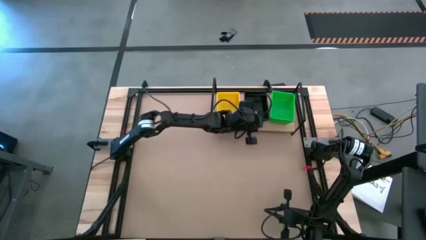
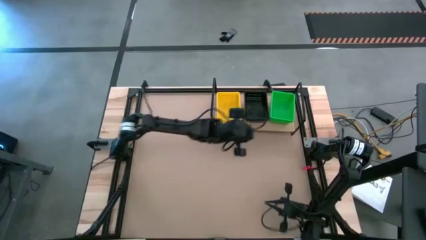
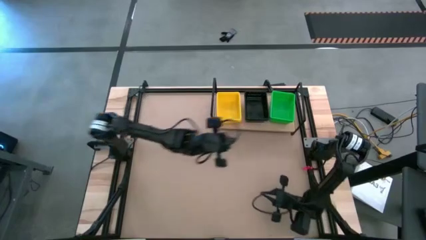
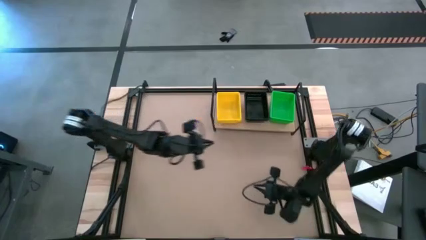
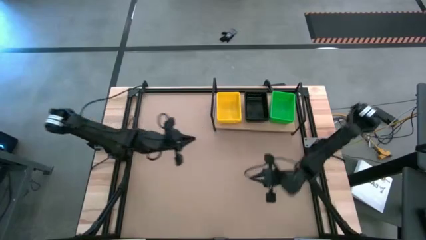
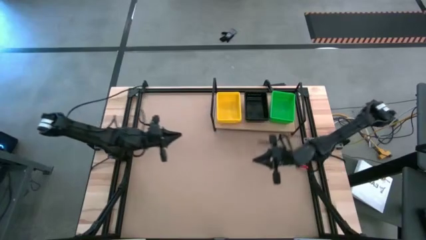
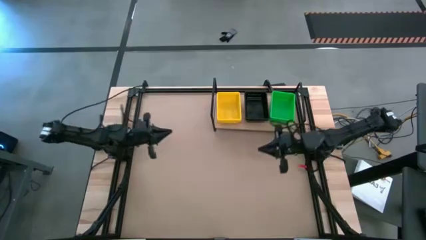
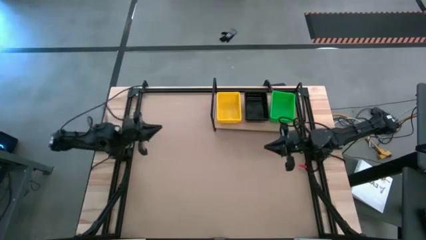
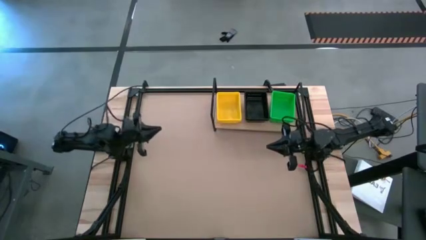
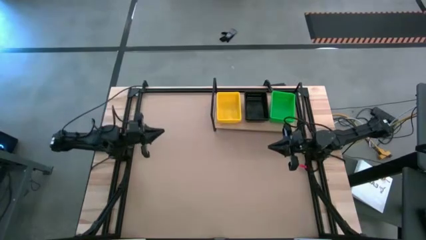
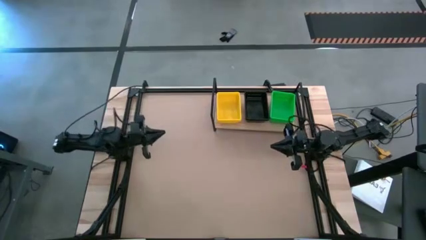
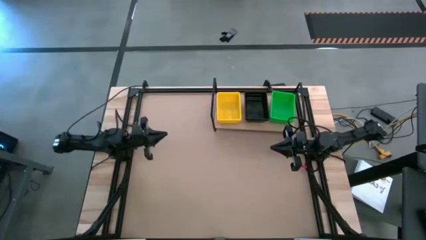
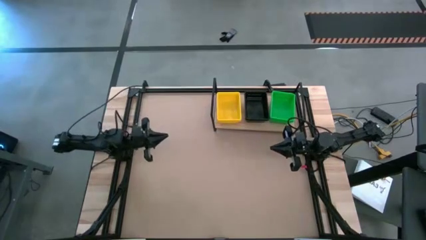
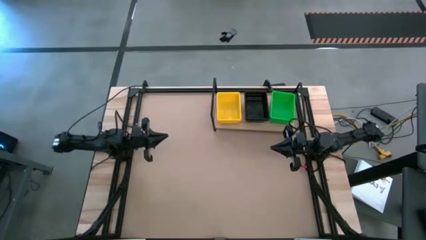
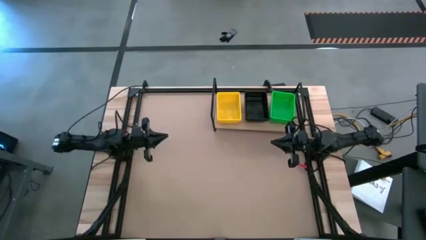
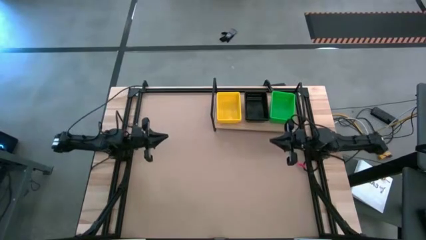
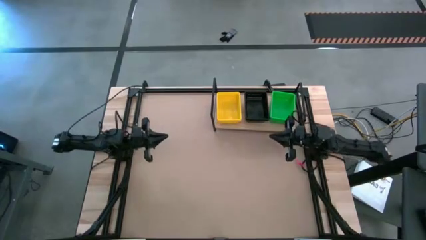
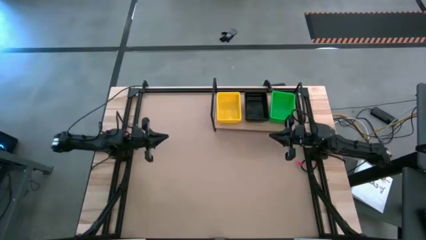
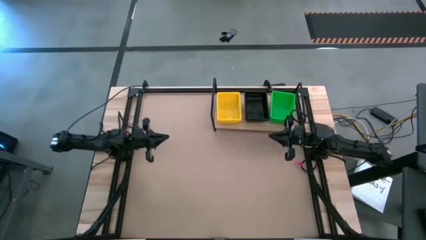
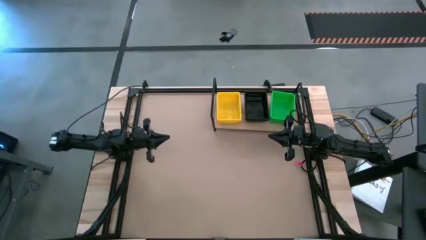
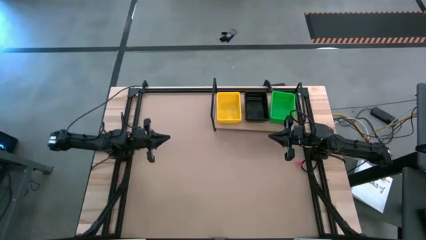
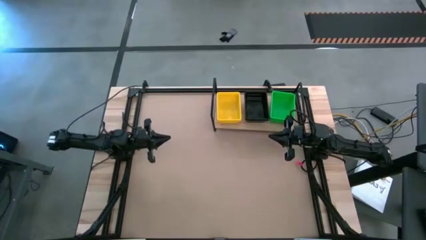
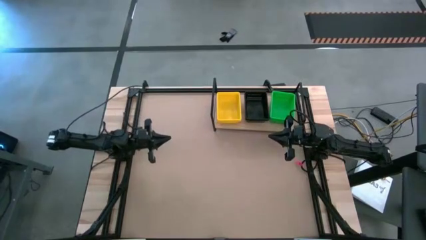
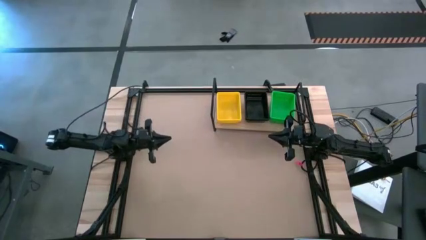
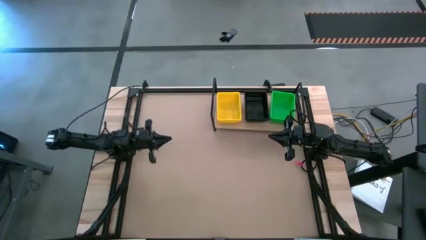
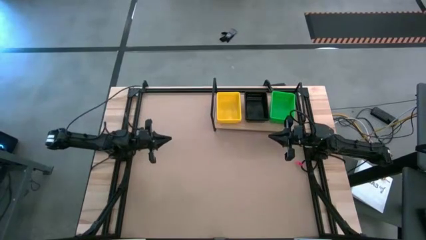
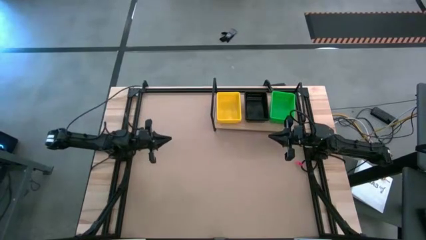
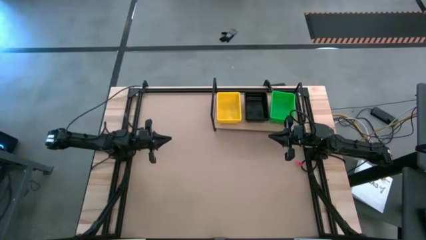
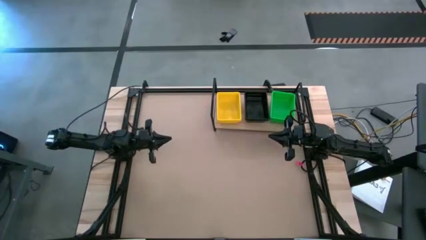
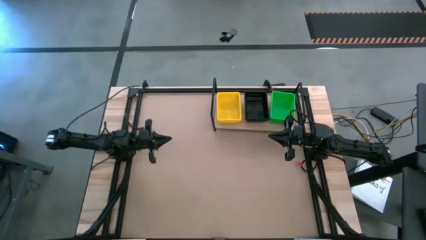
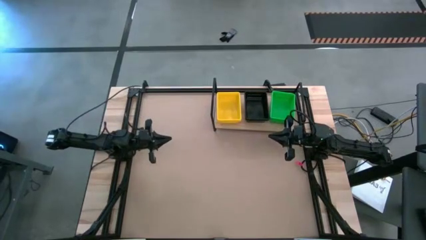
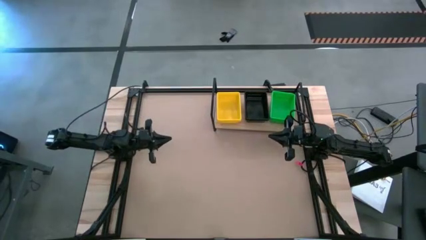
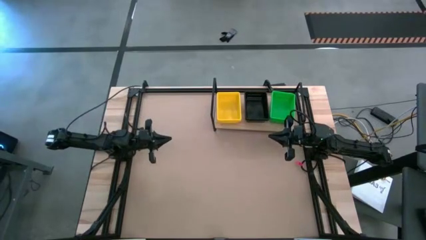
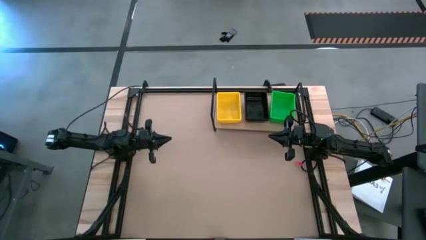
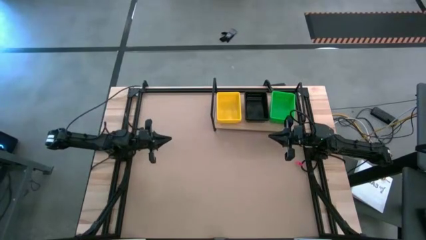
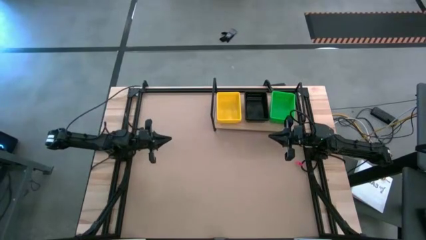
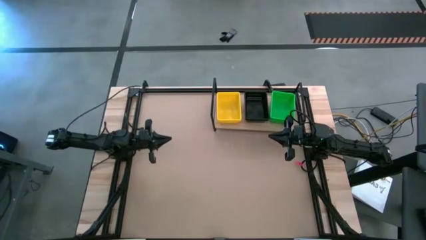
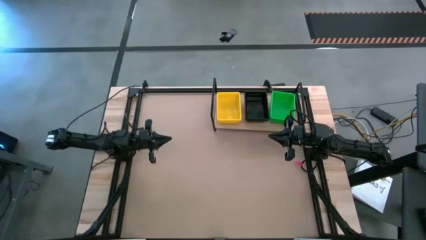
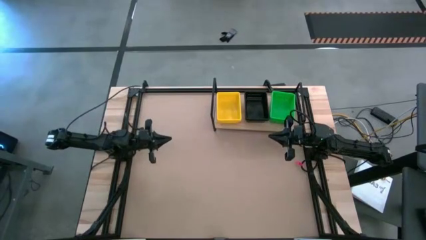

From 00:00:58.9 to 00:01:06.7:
Task: Stack baskets on shelf by color
Return to Home Position

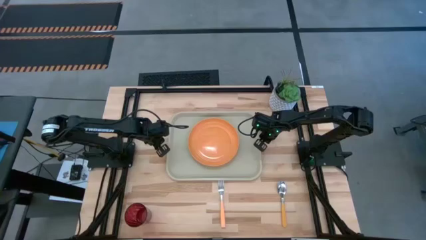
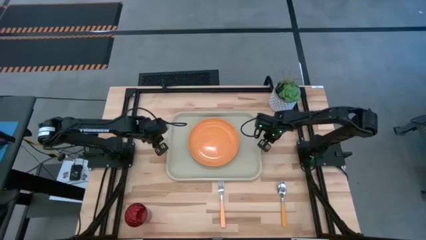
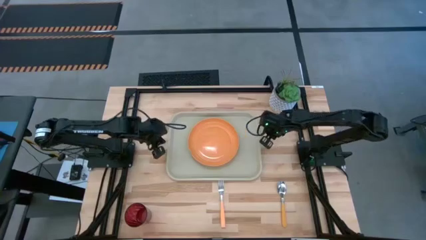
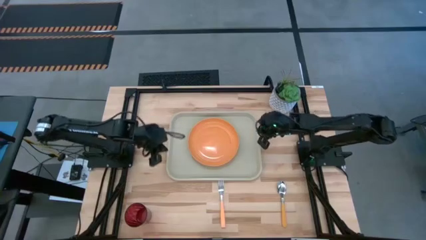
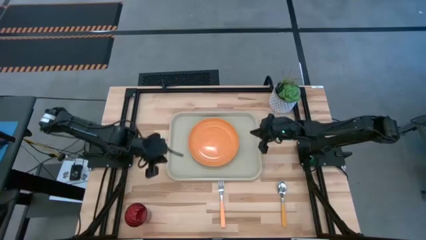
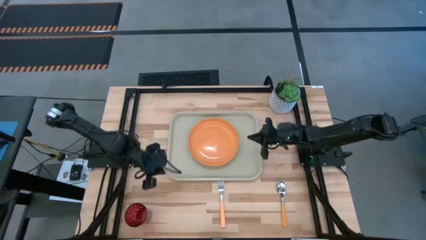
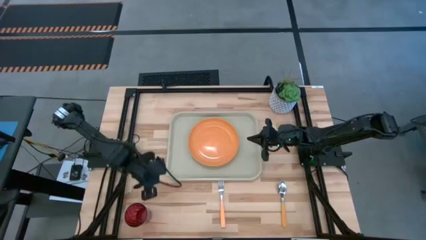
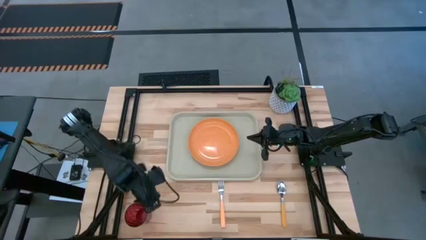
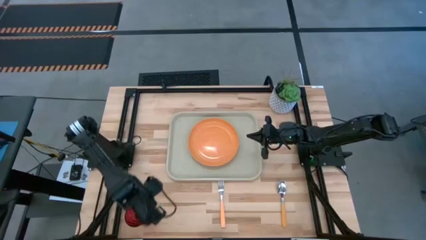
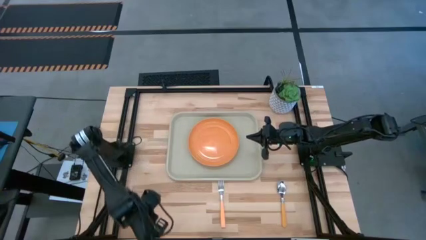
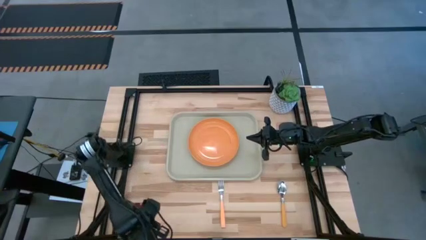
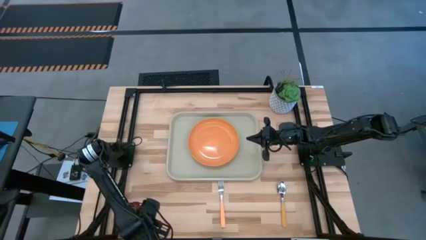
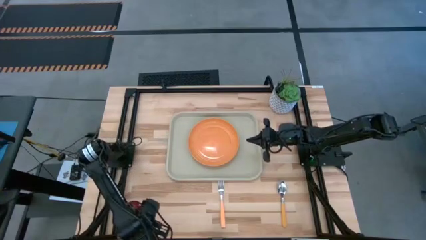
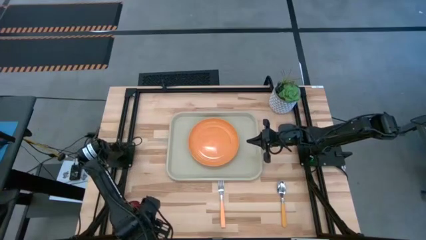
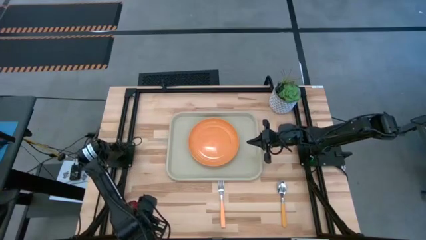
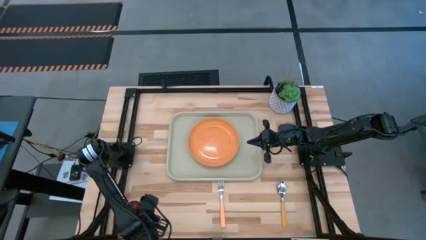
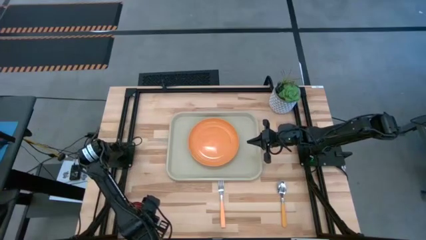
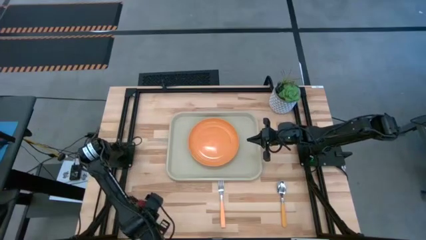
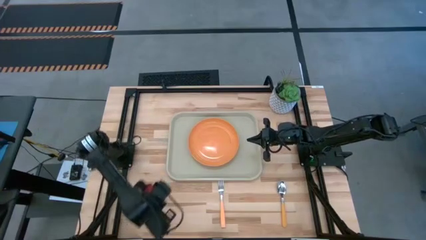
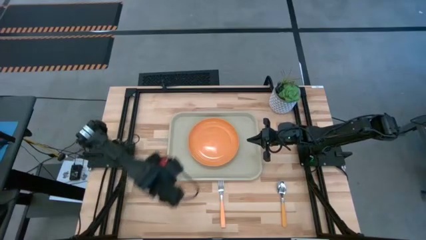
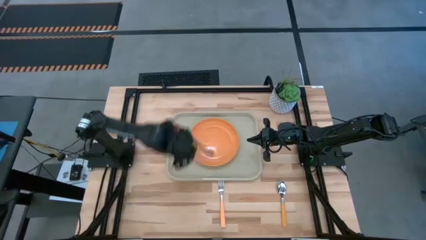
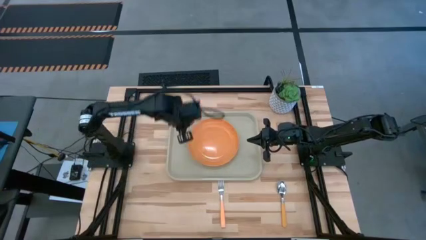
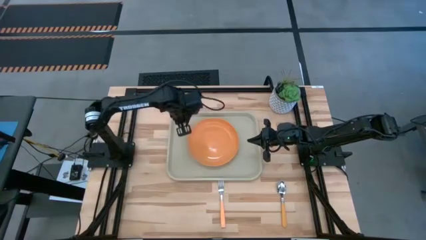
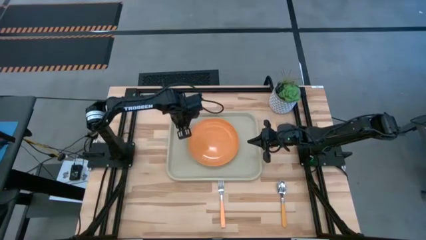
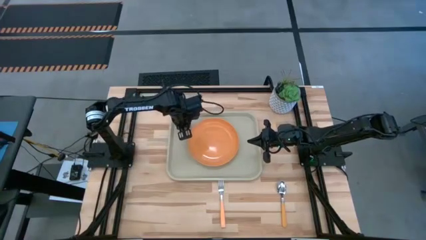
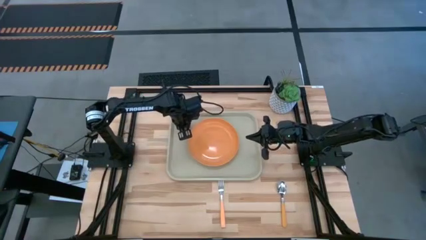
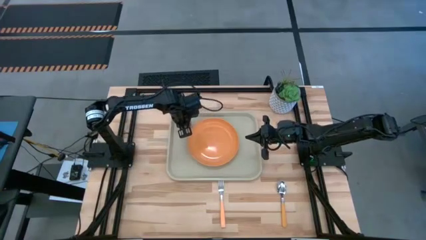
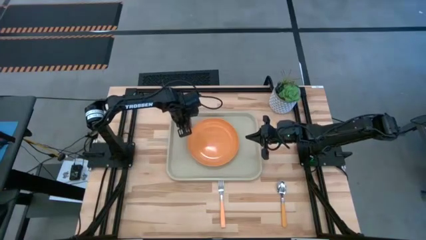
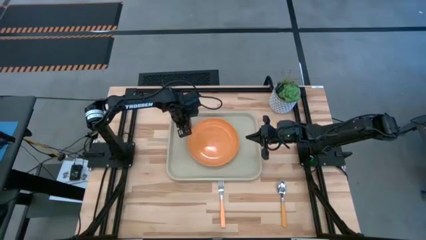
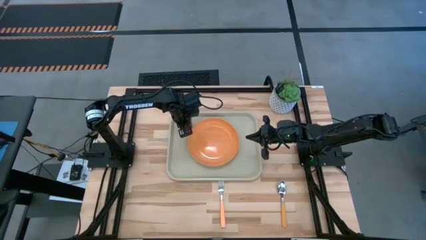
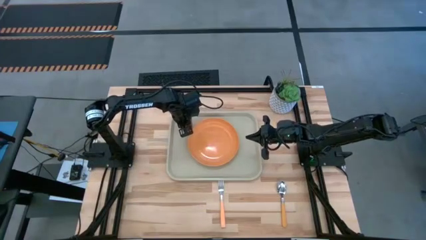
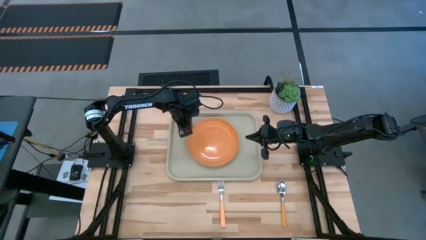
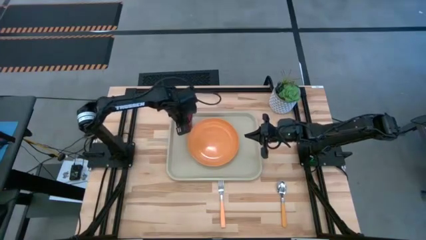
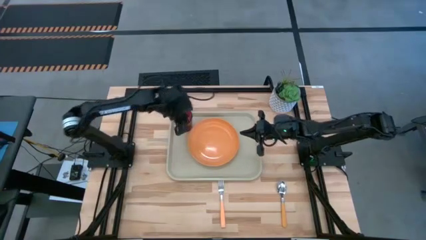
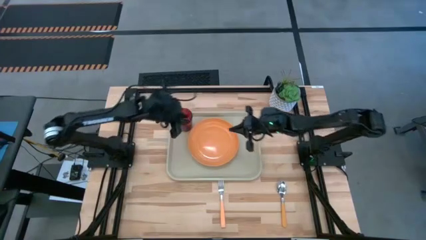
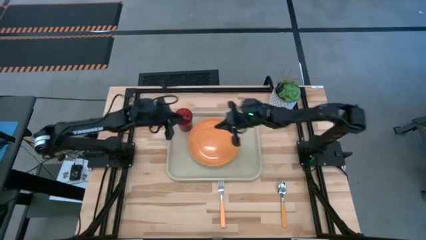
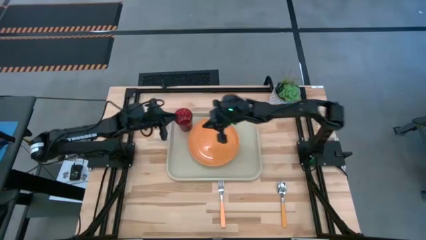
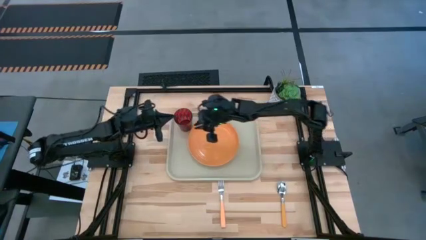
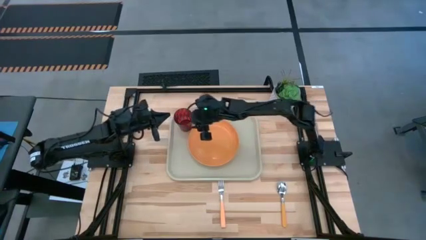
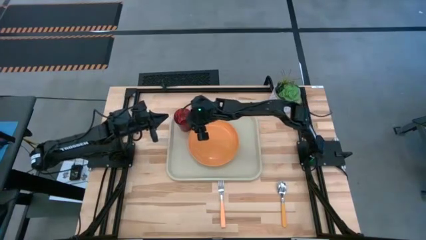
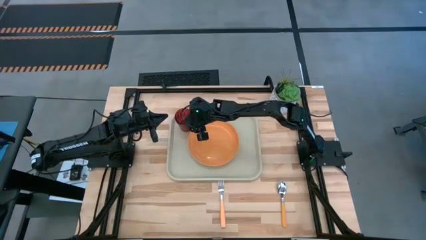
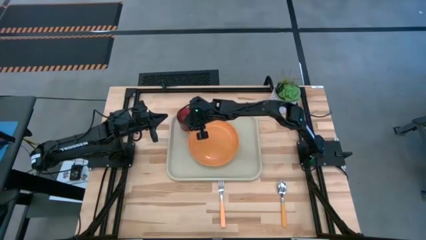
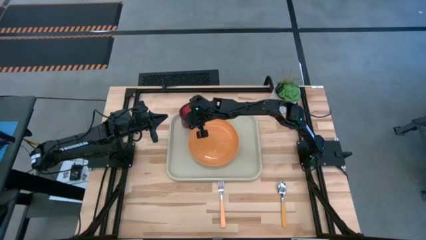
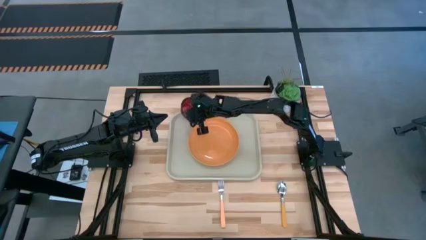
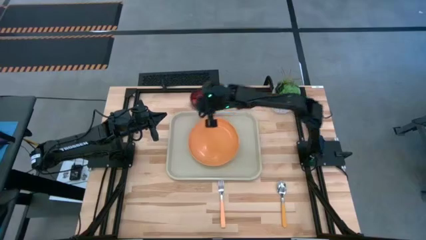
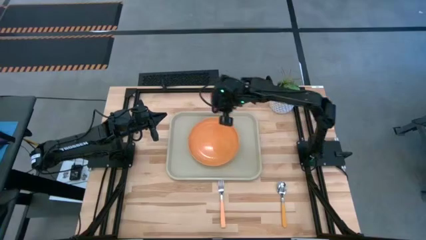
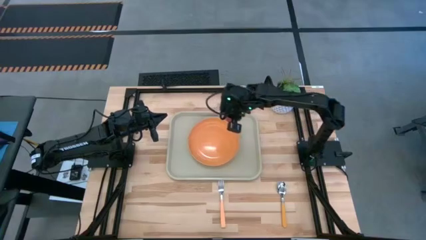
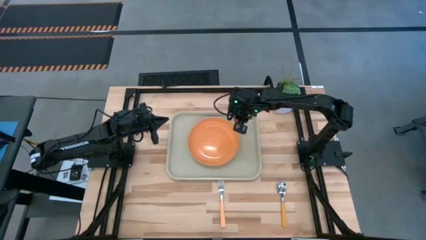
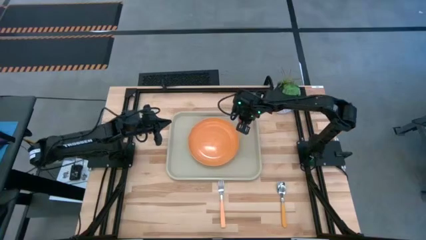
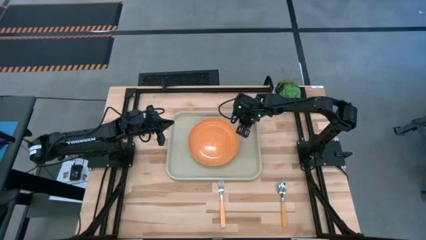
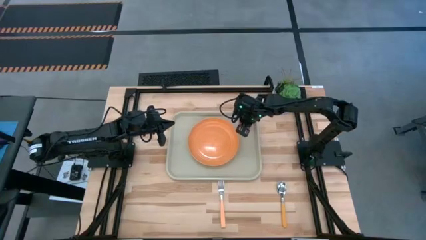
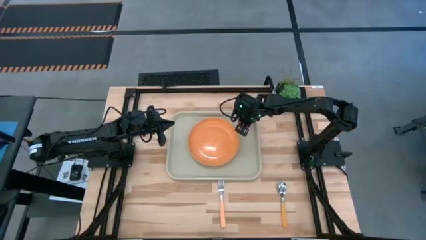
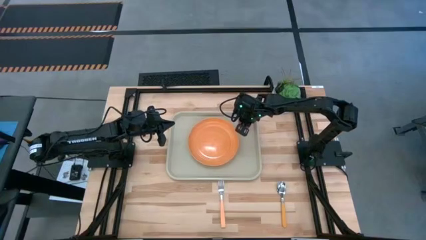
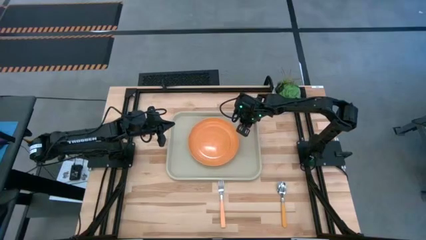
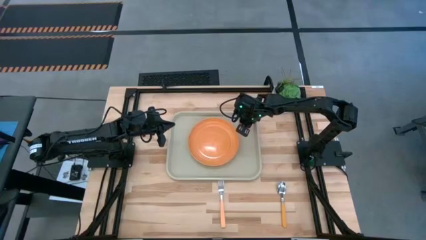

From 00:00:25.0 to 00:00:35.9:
Task: Pick and place plate/cup/fork/spoon on tray
Put the red cup to the top right of the orange plate on the gray serving tray
